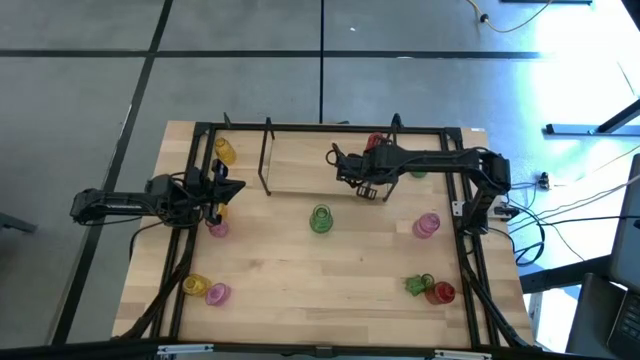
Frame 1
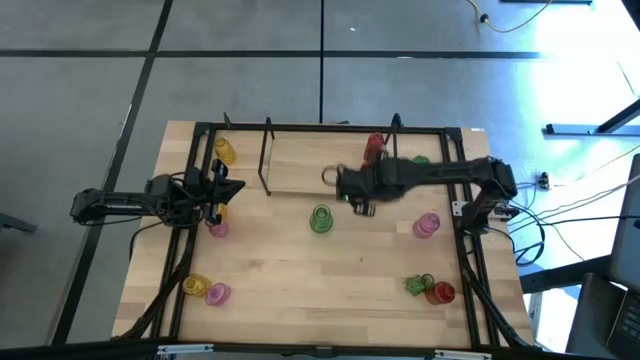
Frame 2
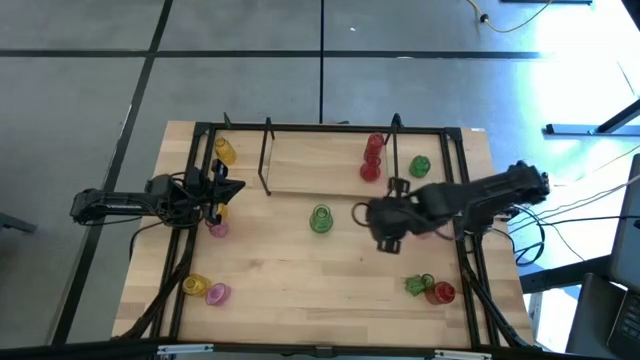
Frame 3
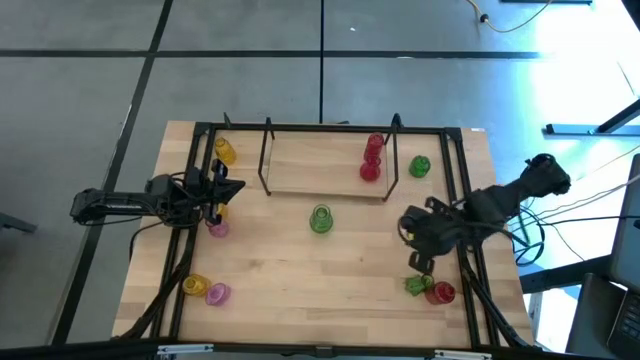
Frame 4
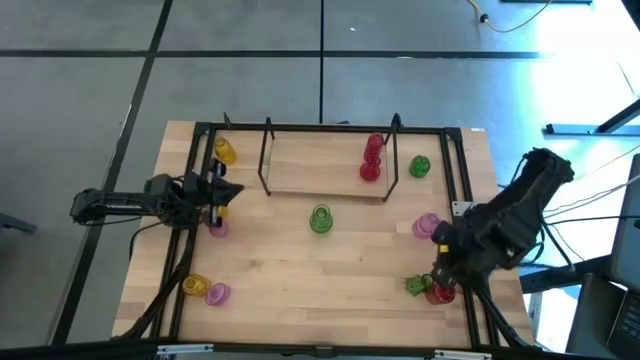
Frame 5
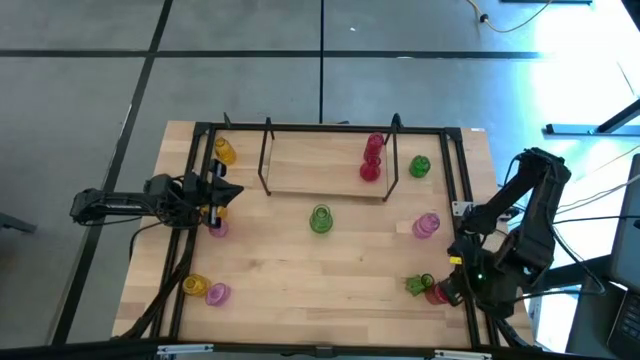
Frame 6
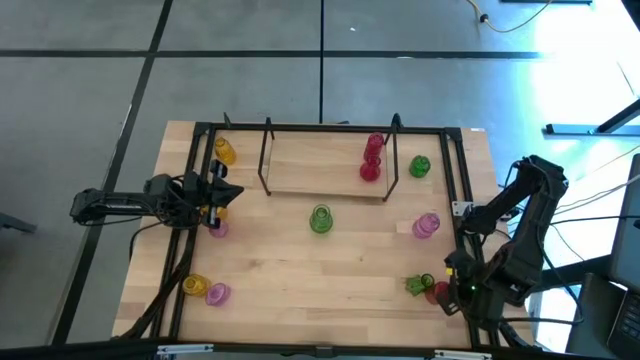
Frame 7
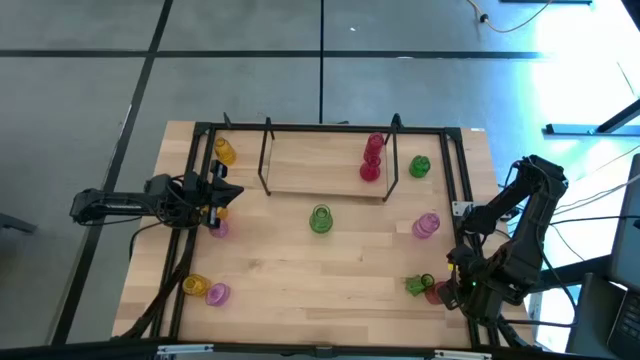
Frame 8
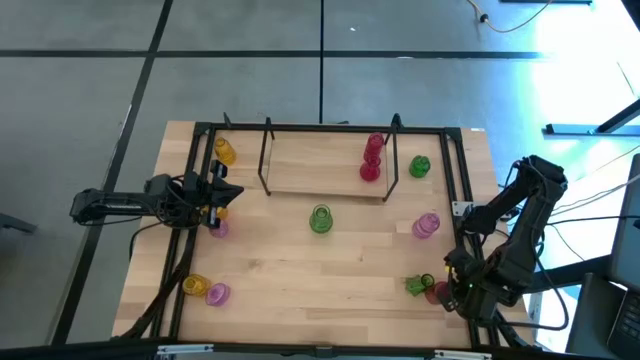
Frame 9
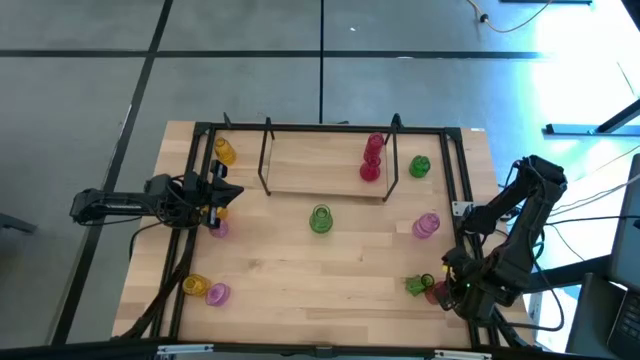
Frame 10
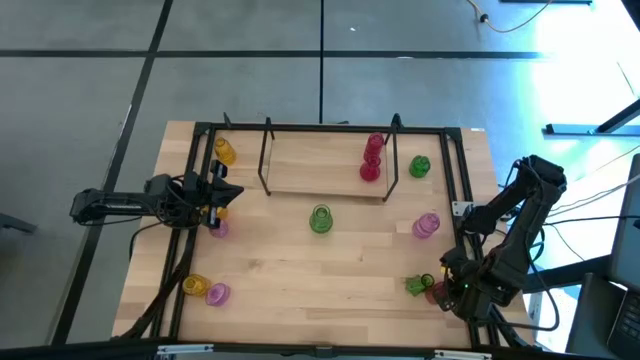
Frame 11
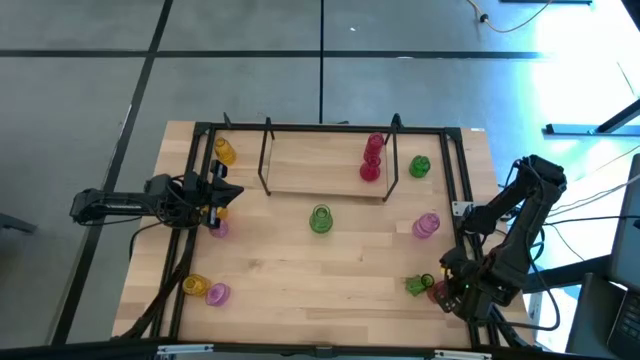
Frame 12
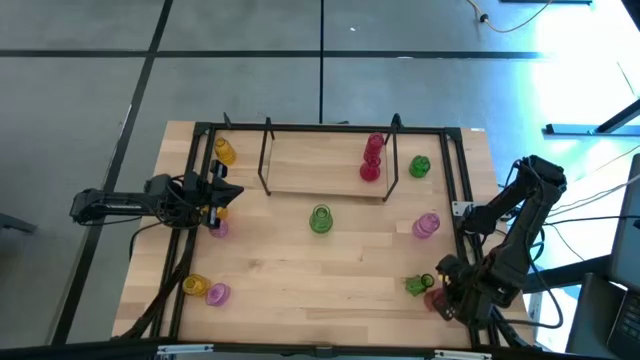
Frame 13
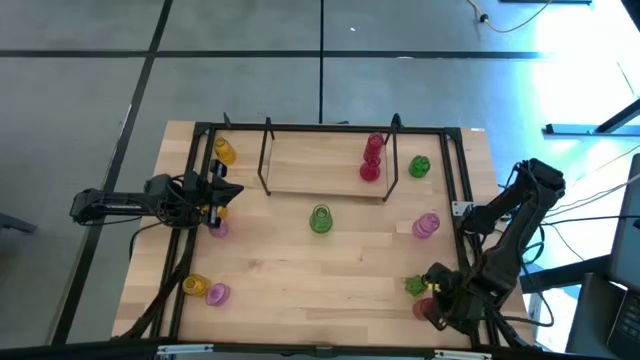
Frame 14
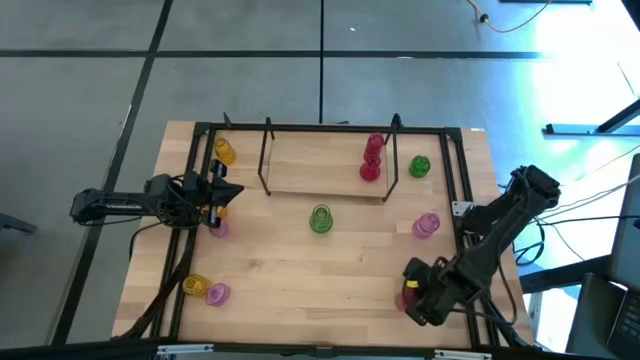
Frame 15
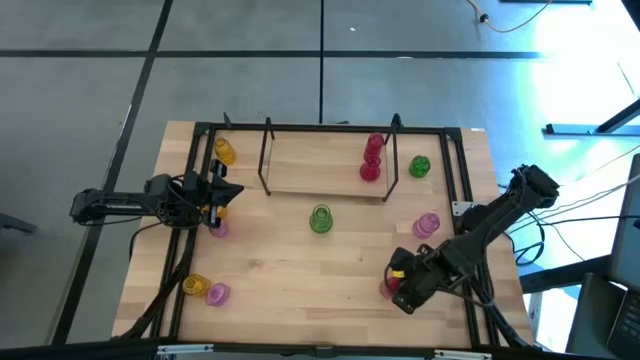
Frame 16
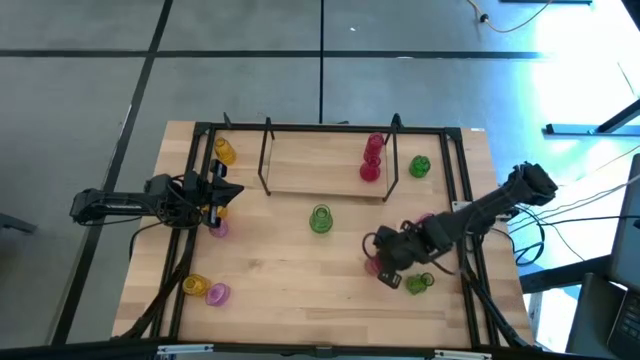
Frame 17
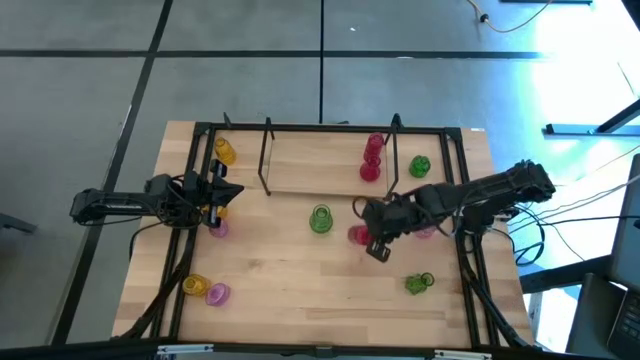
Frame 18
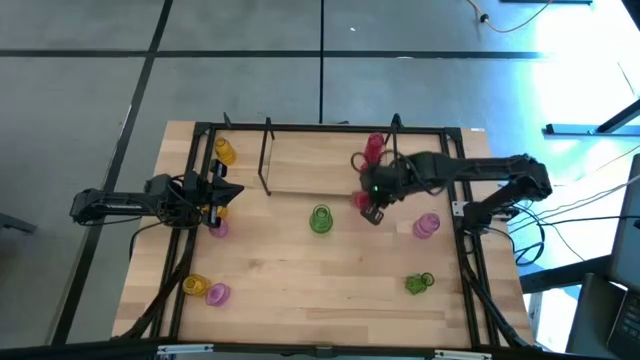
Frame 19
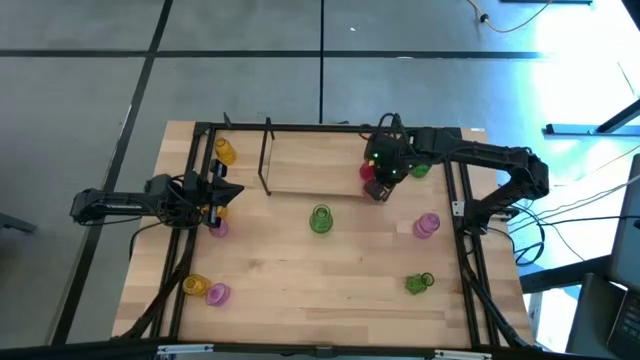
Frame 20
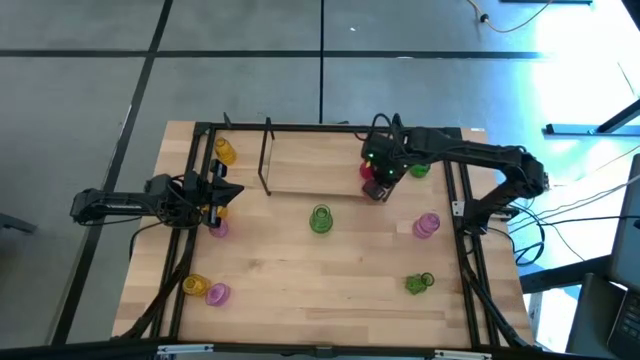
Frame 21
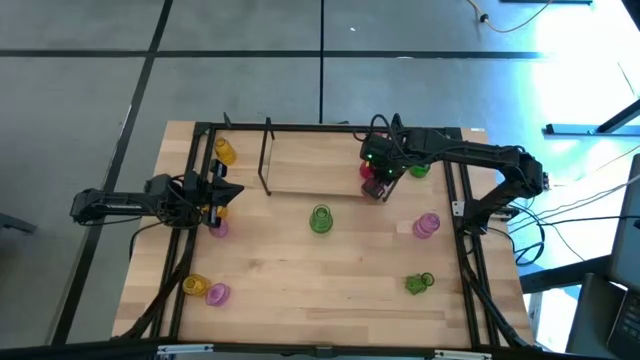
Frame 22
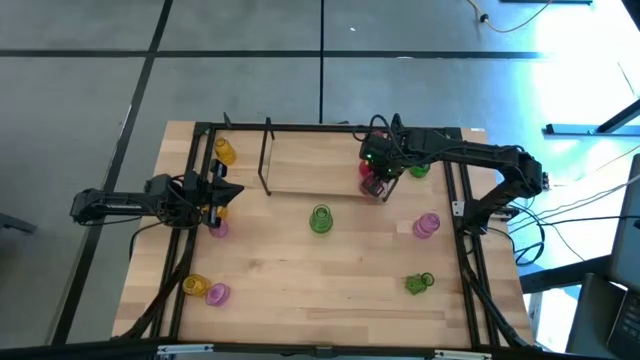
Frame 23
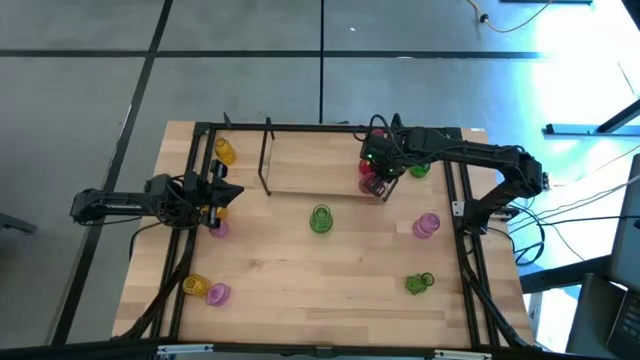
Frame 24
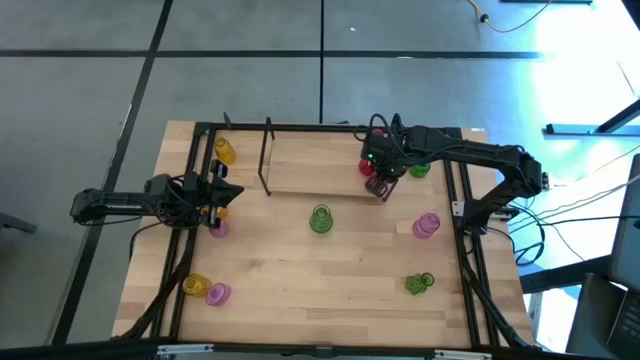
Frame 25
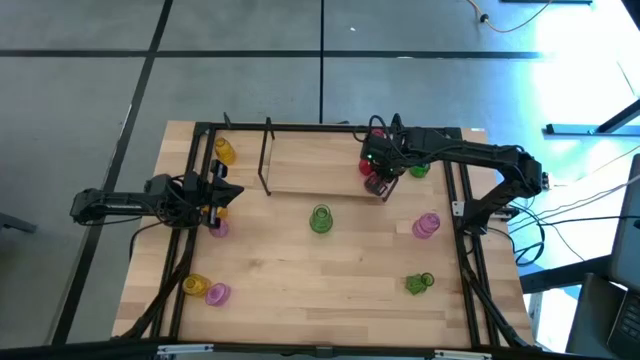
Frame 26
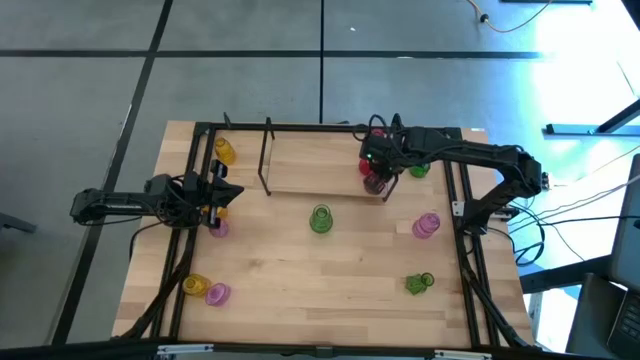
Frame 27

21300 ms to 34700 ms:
Task: sort vases onto shelf
Put the red vase on the shelf aligned with the other red vases

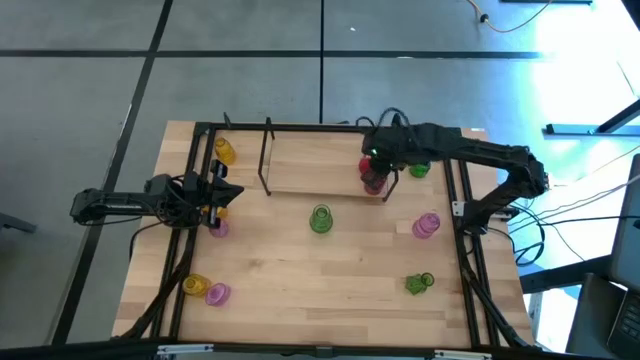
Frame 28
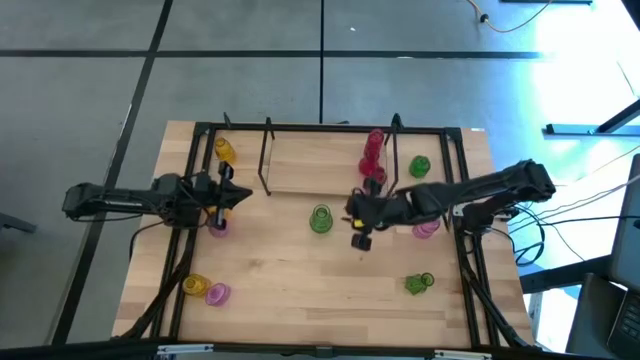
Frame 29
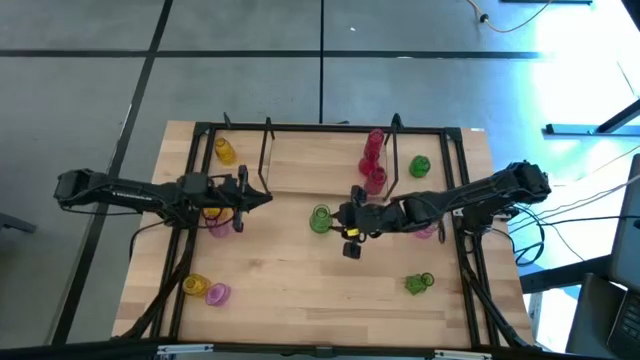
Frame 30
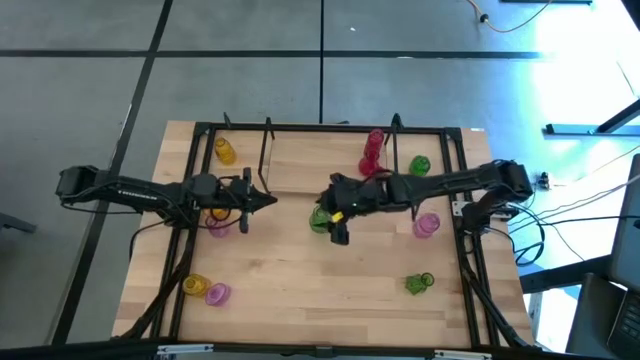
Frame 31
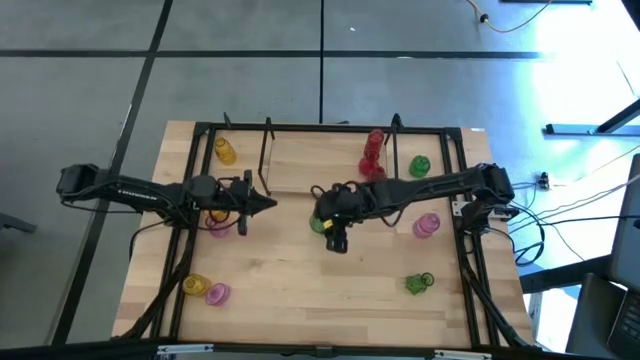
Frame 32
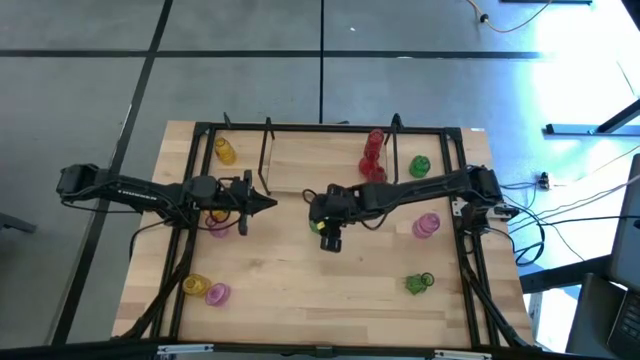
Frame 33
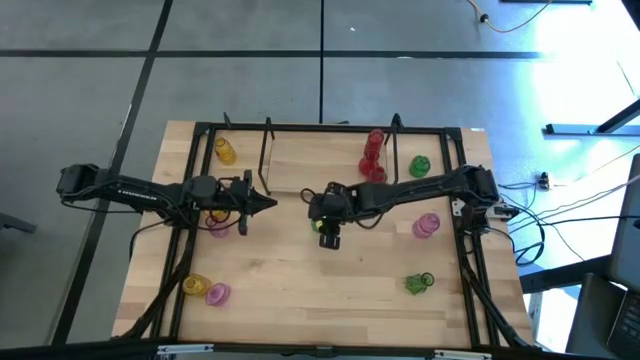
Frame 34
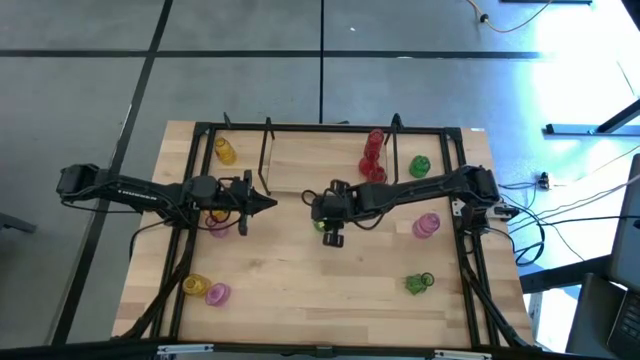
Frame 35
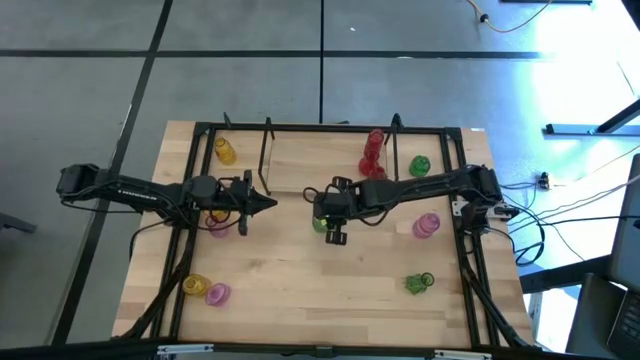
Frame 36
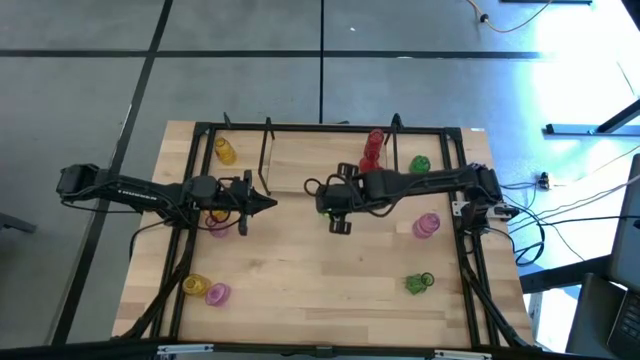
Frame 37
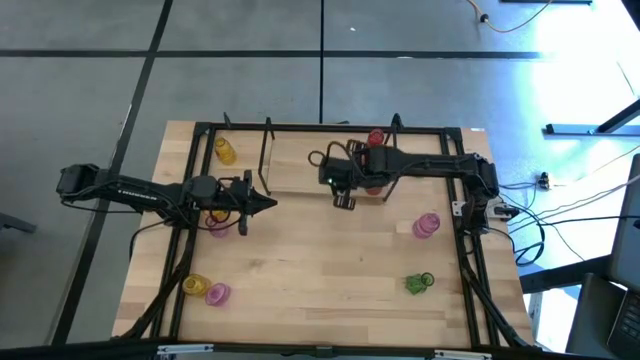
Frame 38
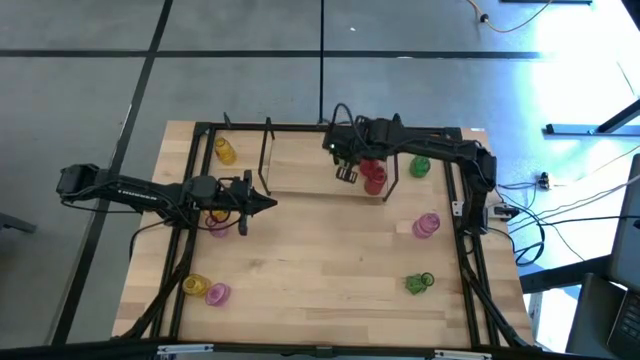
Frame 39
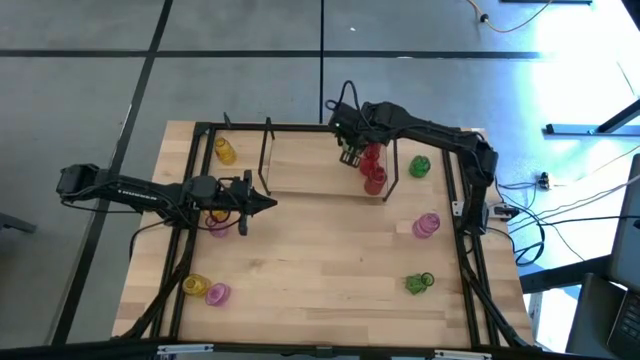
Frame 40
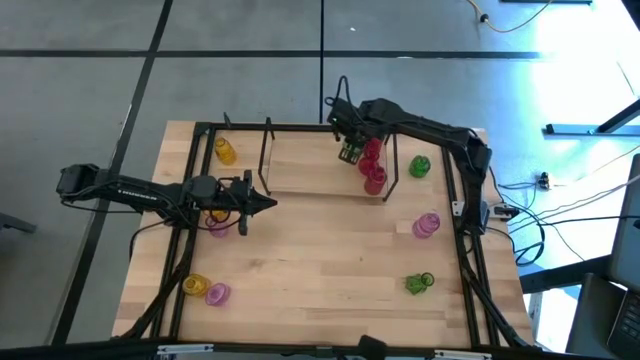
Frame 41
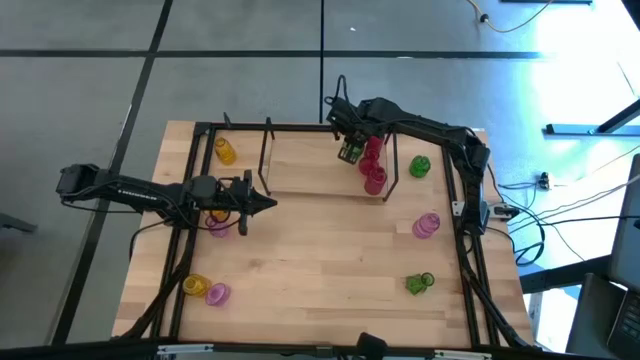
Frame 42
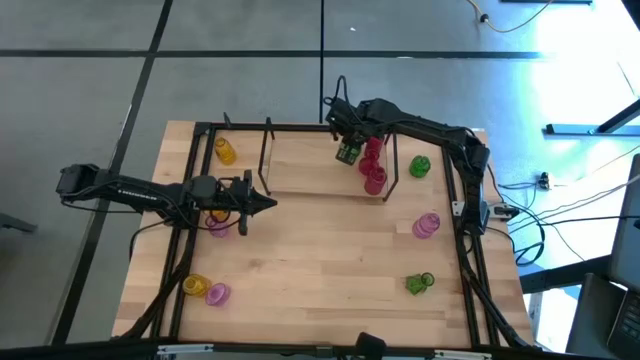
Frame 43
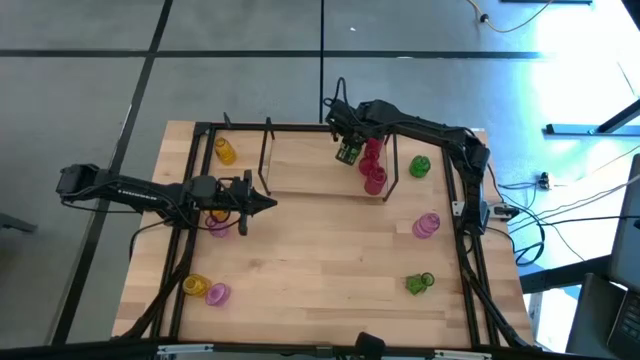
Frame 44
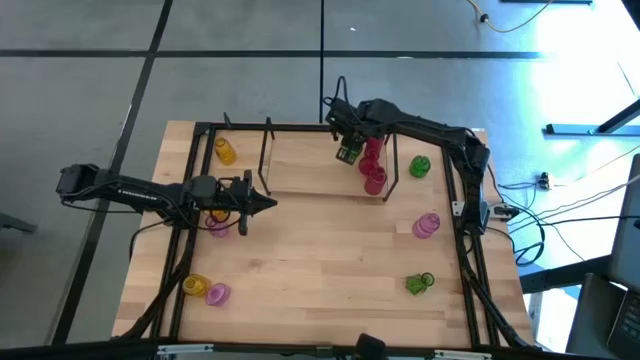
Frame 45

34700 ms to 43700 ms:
Put the left green vase on the shelf
